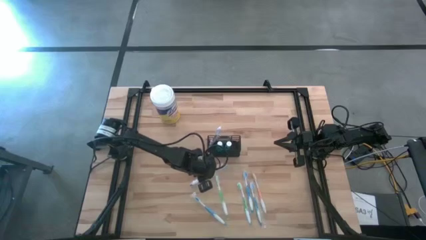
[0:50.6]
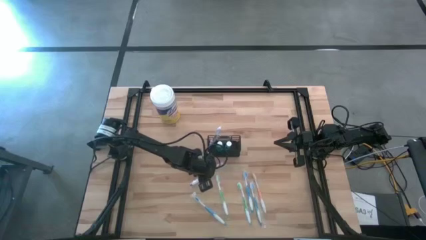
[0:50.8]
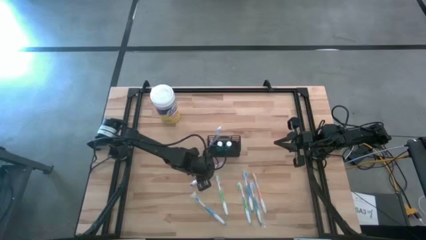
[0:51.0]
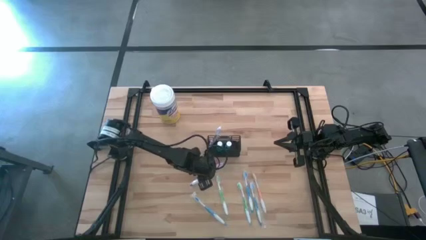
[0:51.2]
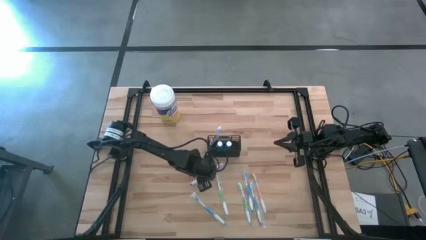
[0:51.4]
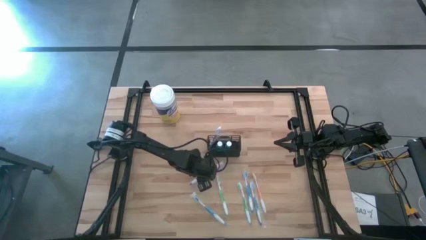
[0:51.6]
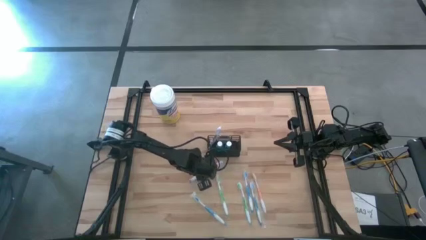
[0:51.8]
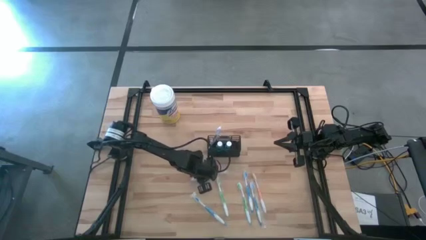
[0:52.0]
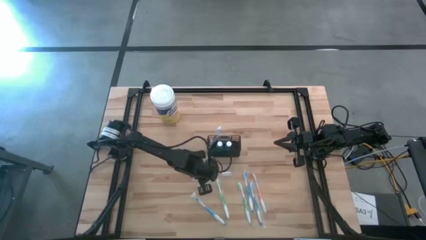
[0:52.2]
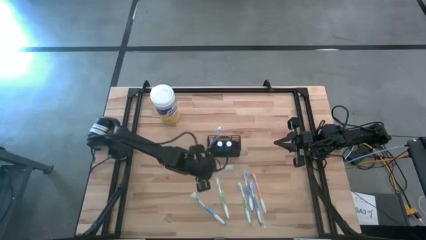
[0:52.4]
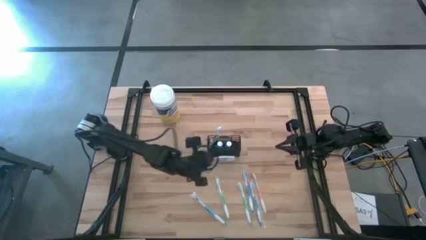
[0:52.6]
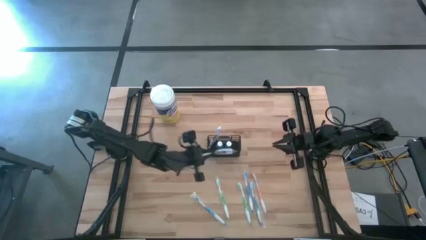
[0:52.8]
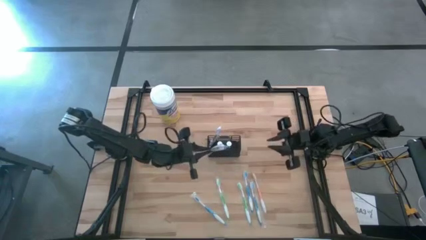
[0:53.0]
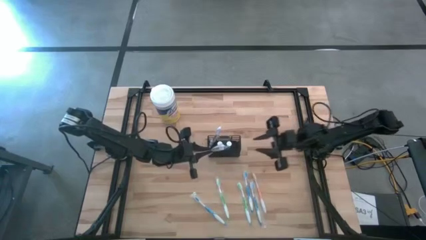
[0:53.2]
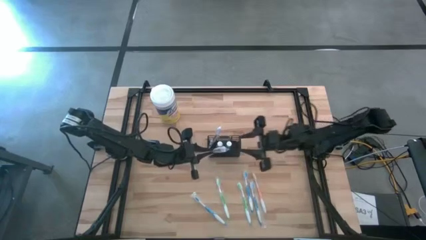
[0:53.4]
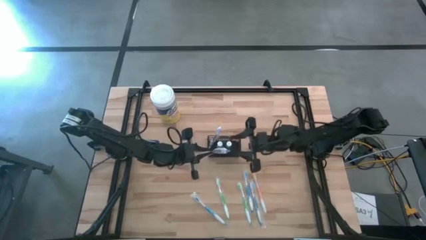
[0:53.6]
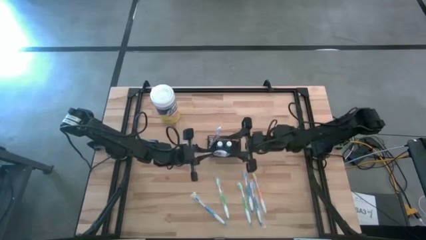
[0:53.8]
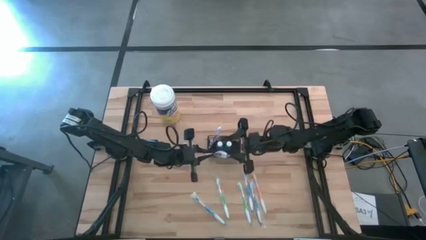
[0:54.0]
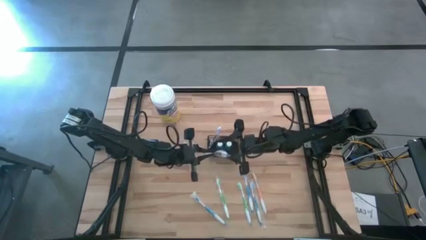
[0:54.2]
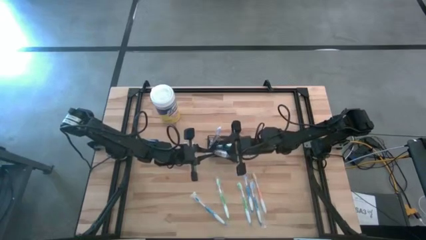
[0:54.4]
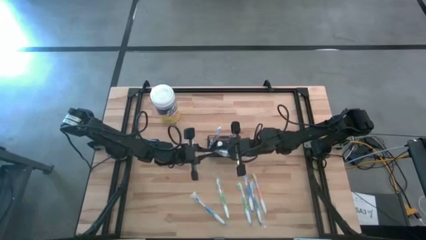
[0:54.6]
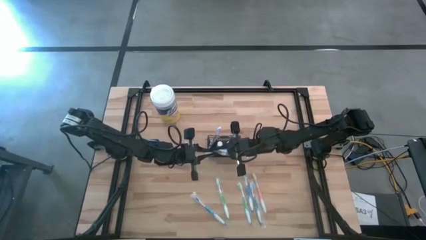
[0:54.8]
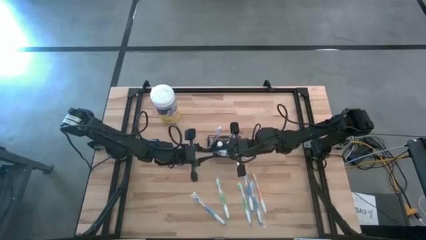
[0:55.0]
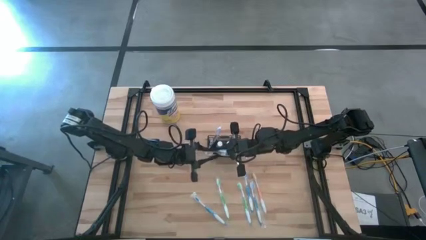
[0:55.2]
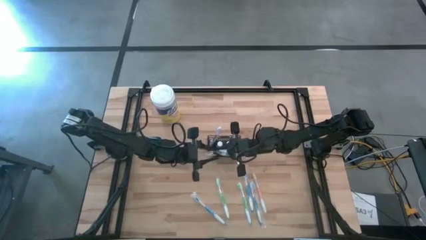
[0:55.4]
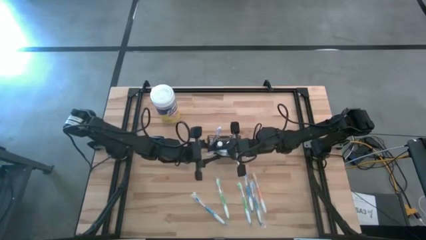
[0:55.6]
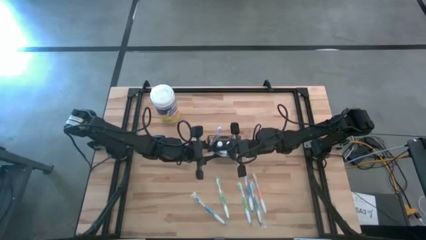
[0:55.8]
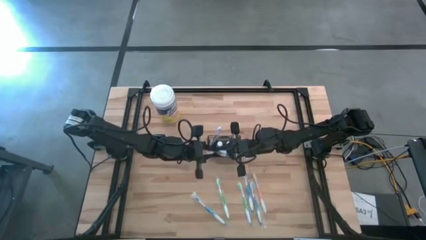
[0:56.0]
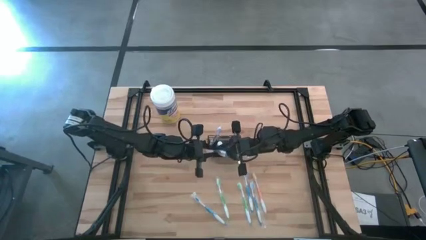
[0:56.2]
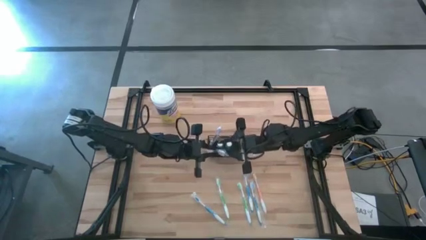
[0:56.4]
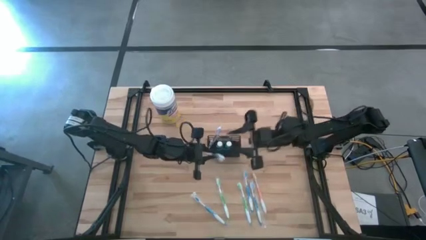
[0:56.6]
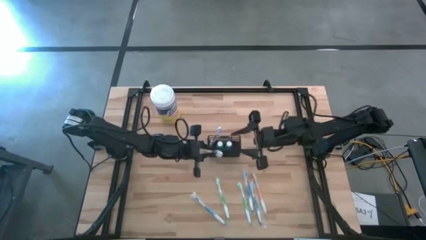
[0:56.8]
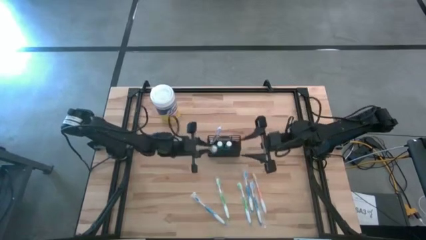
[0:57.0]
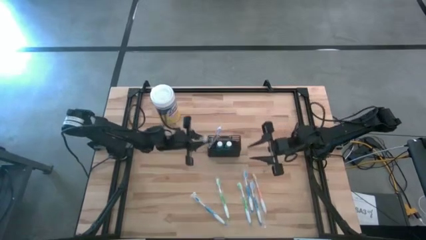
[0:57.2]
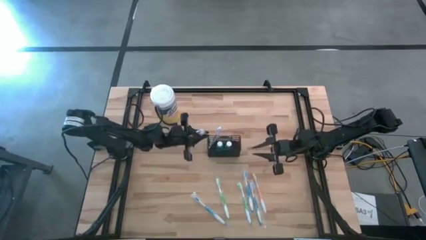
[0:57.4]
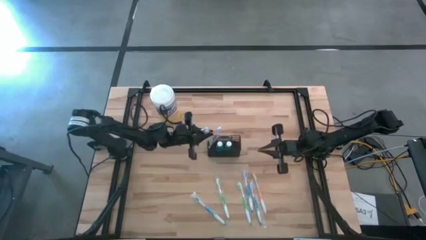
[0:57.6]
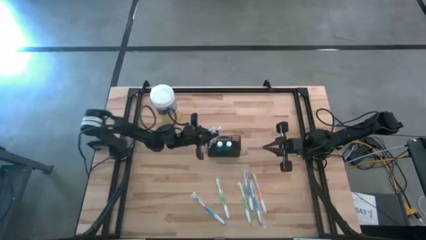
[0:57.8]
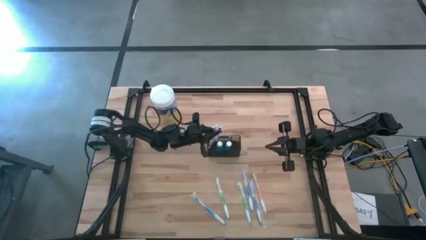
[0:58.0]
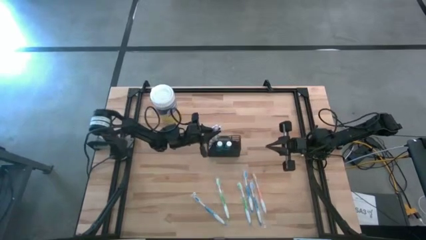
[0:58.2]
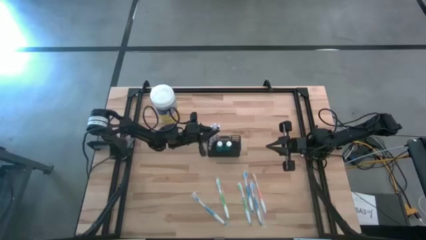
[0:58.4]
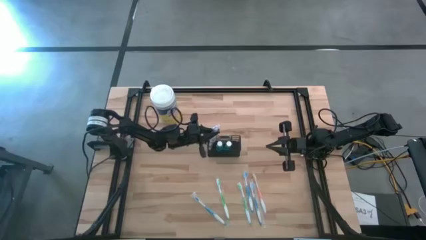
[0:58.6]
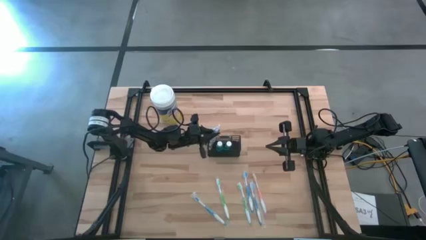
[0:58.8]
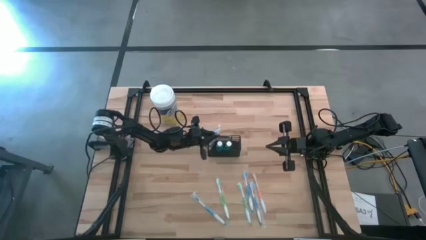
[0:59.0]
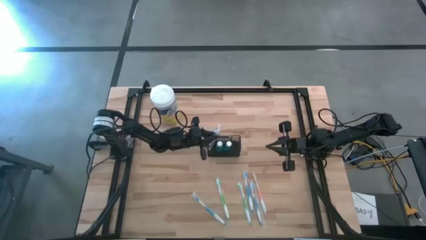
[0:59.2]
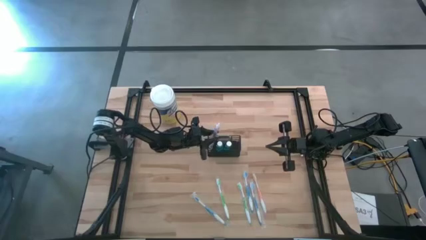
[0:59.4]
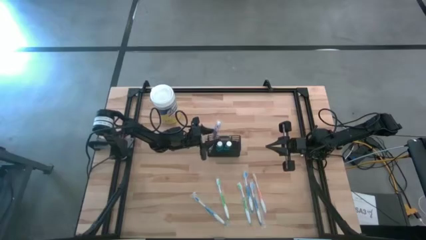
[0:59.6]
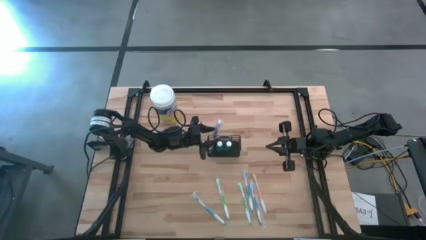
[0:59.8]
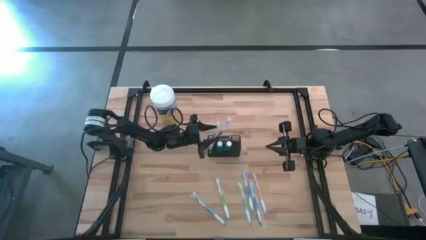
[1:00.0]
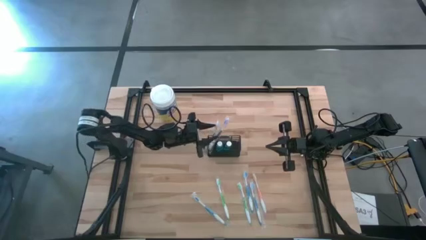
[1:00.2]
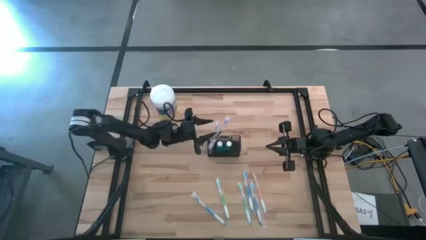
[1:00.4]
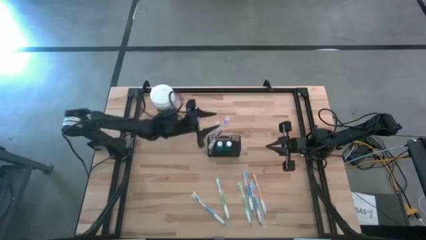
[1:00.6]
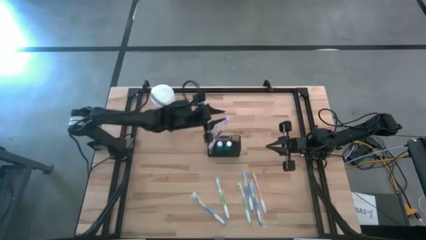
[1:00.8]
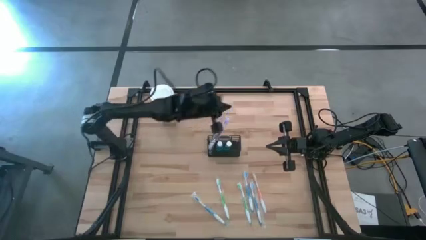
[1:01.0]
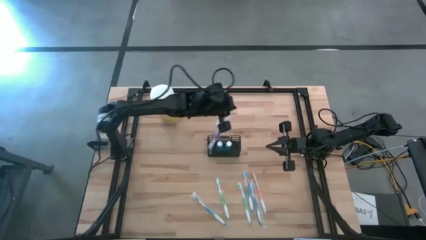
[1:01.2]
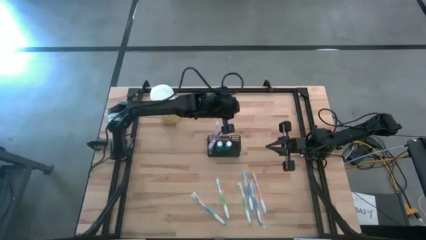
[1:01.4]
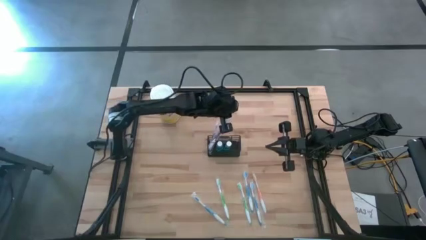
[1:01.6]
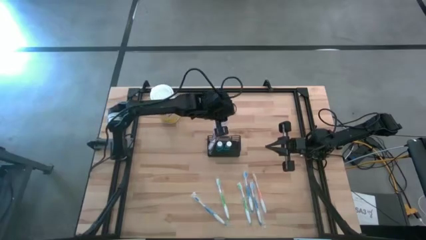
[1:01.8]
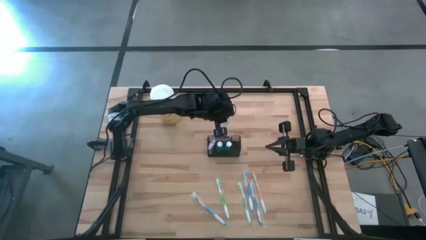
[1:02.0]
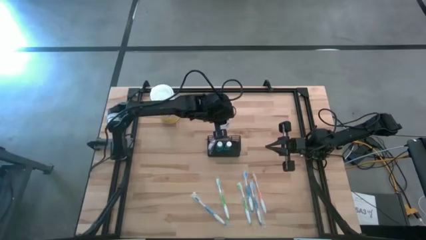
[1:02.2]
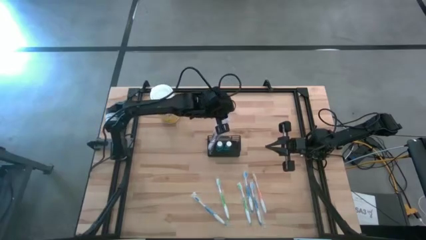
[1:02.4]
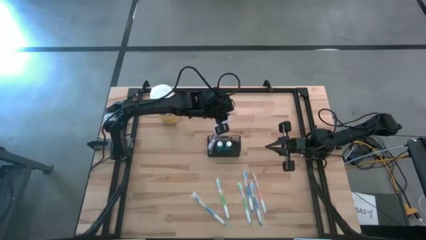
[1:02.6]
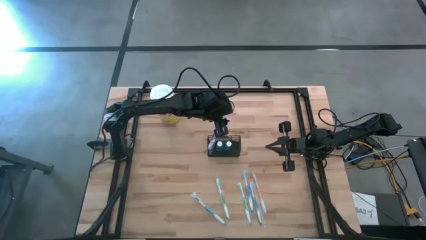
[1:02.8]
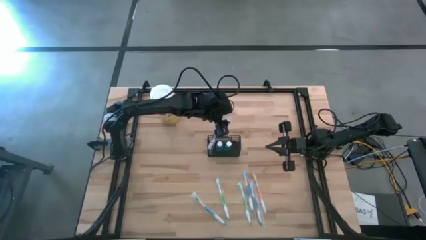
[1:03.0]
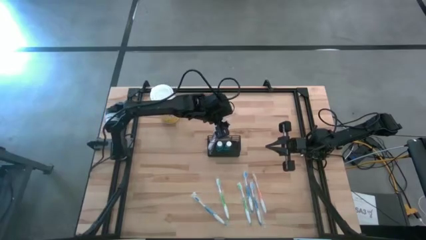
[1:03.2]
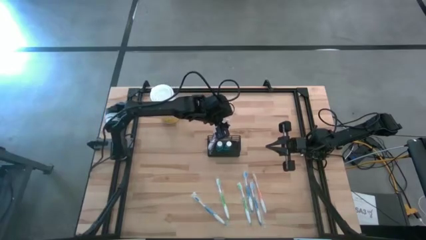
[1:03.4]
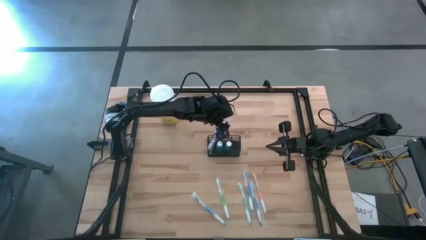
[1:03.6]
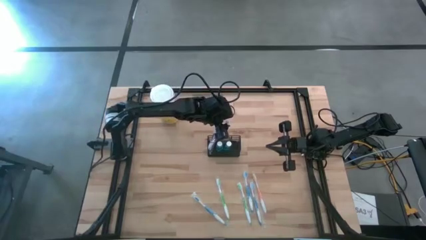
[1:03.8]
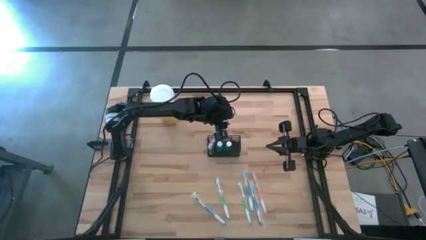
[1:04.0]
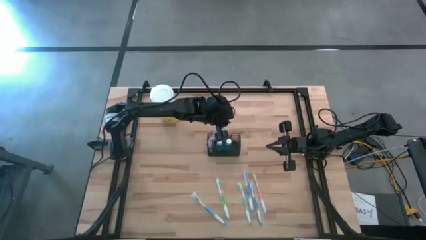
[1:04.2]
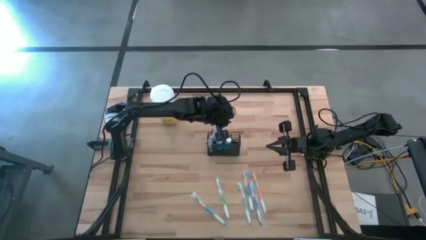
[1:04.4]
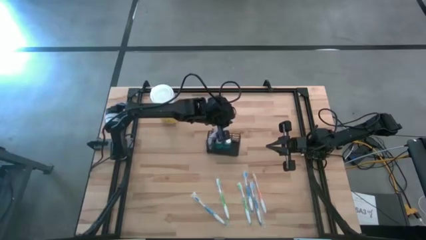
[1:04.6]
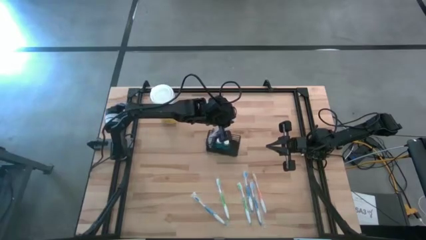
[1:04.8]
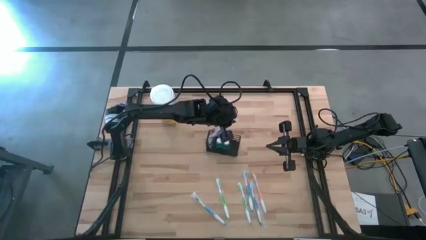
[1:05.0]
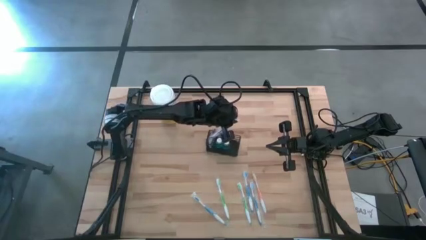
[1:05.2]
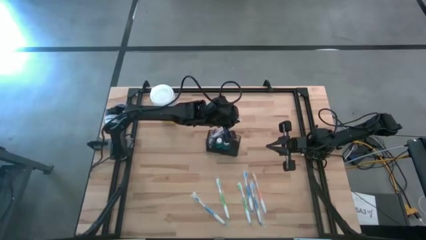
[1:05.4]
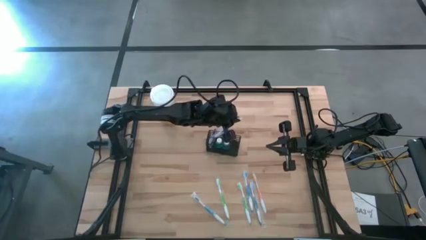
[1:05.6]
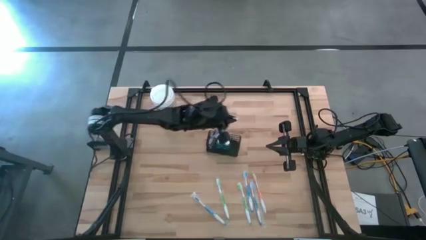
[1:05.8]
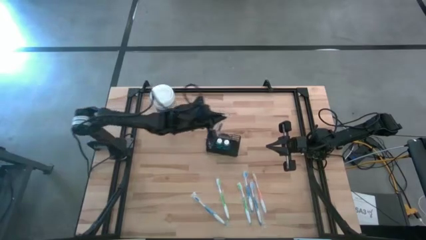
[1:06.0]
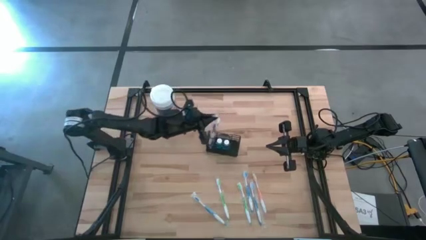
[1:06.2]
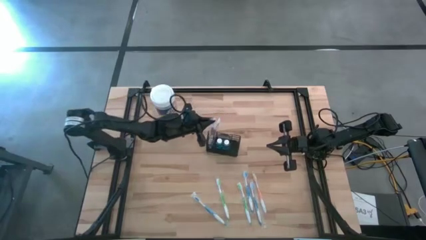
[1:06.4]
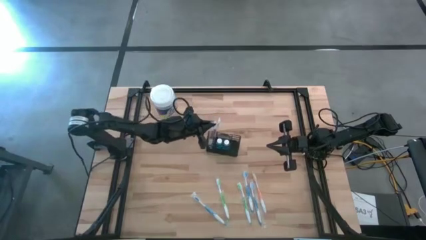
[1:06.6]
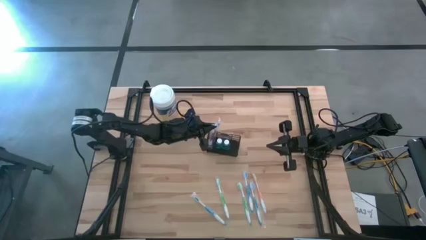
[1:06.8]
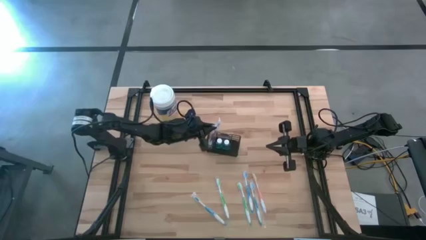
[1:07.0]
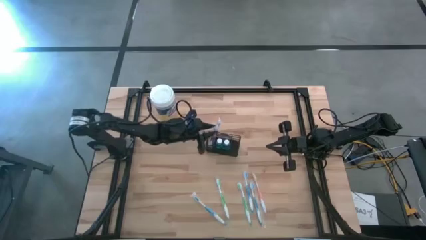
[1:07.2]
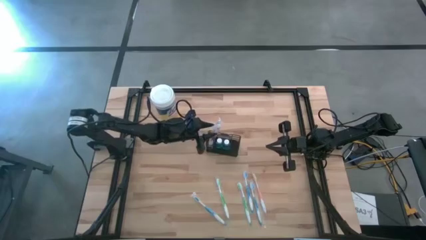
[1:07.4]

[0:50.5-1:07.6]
Task: Pick & Place toothbrushing station
Put the purple toothbrush into the wire organizer
